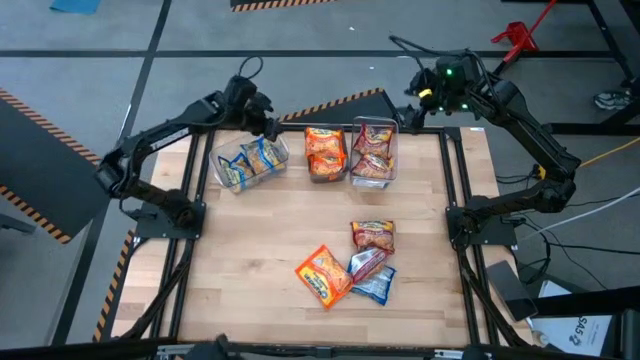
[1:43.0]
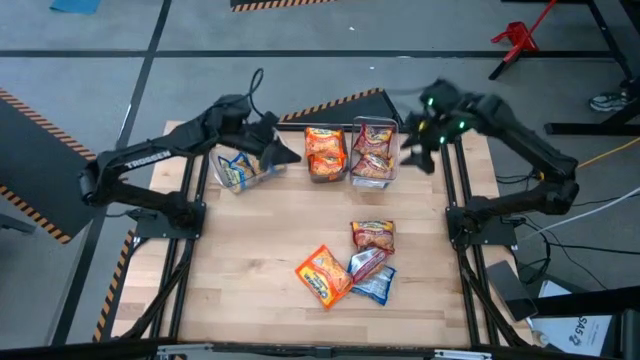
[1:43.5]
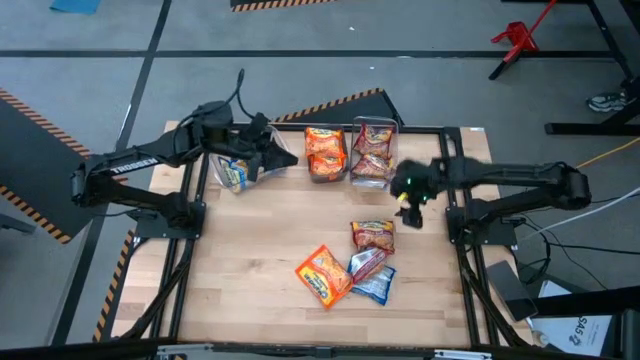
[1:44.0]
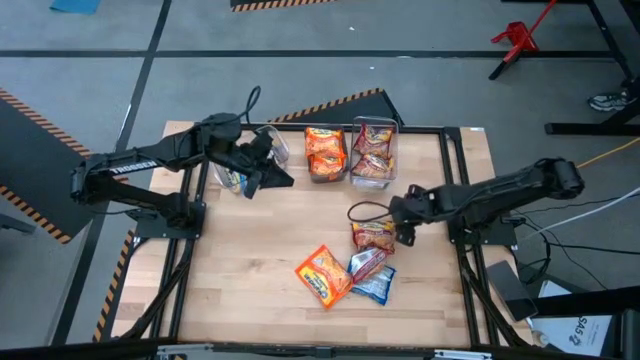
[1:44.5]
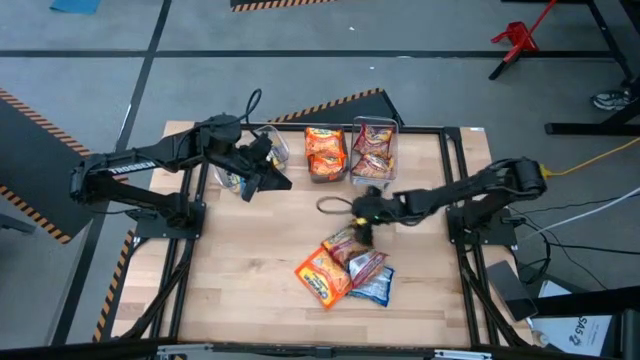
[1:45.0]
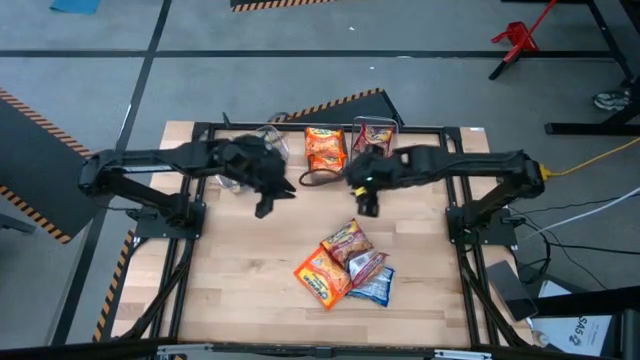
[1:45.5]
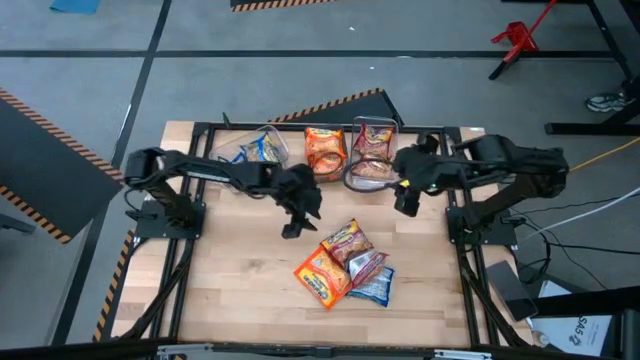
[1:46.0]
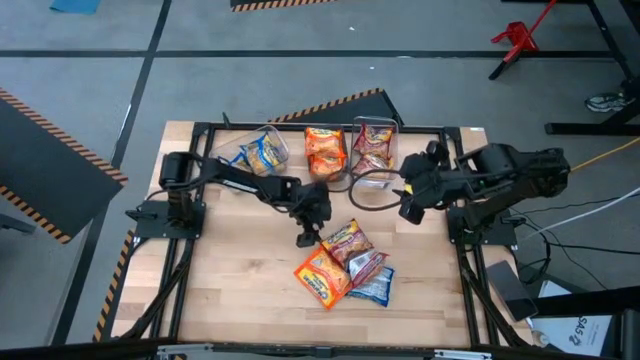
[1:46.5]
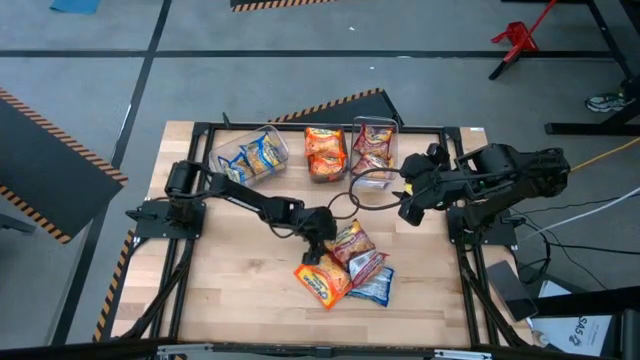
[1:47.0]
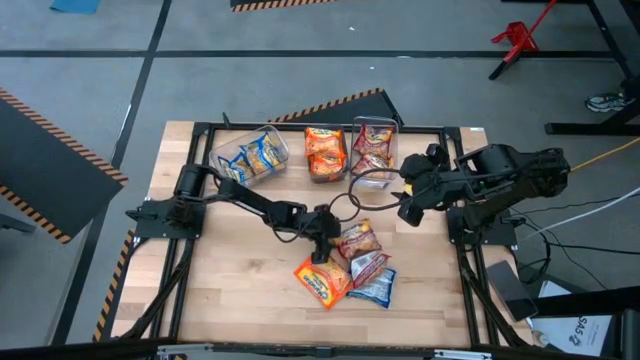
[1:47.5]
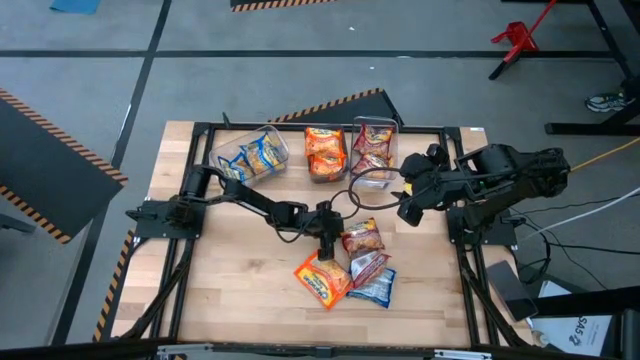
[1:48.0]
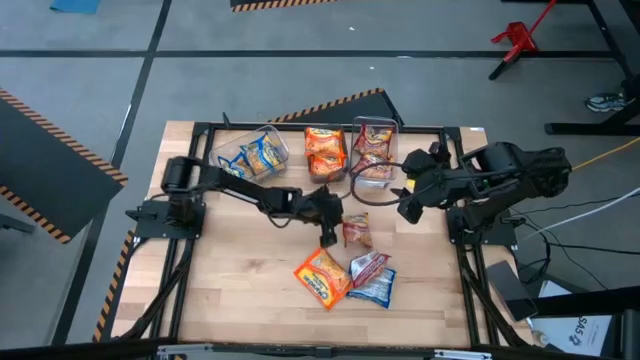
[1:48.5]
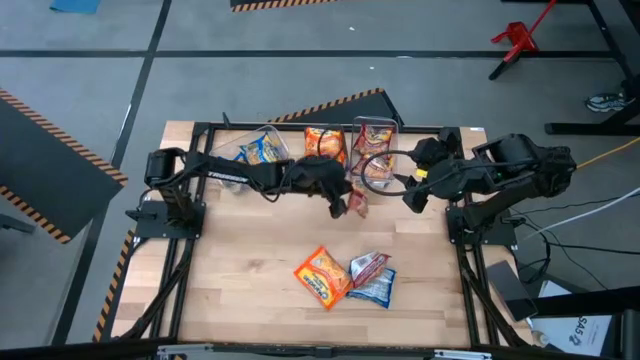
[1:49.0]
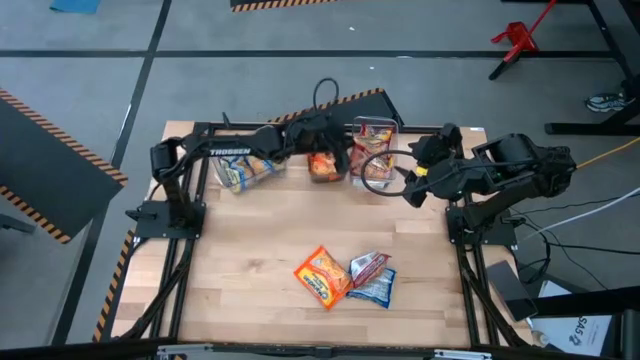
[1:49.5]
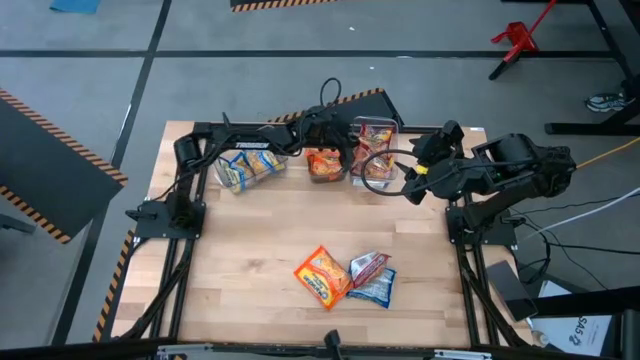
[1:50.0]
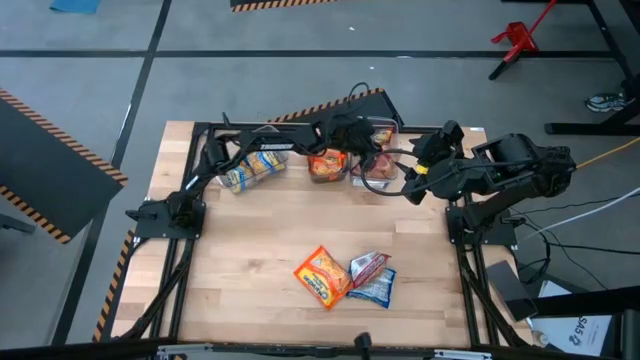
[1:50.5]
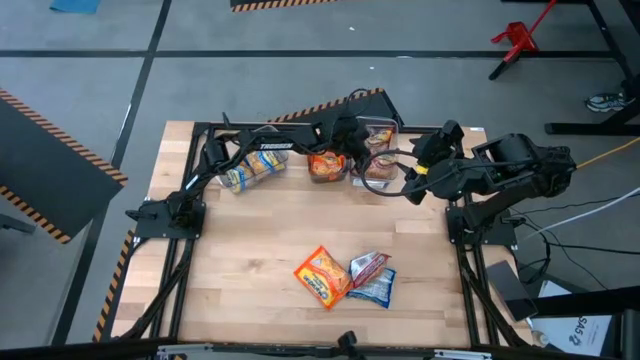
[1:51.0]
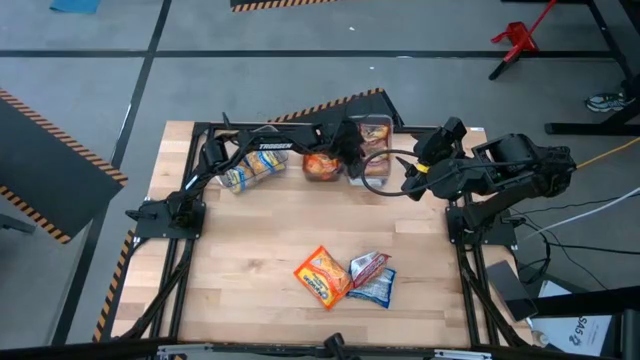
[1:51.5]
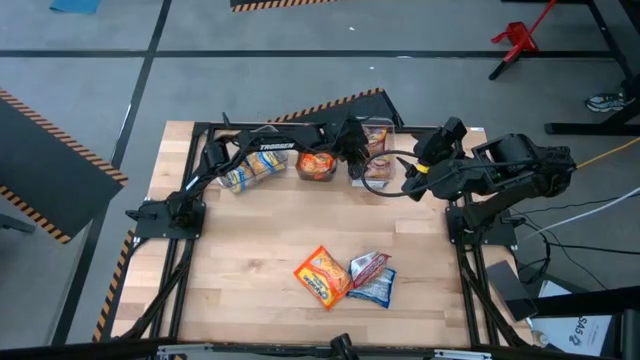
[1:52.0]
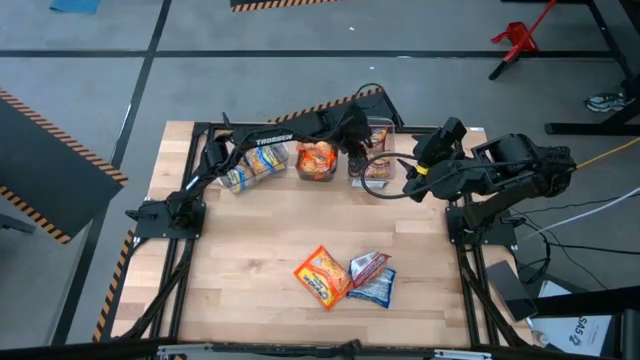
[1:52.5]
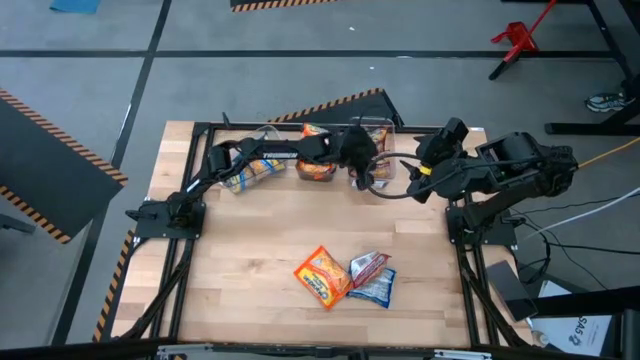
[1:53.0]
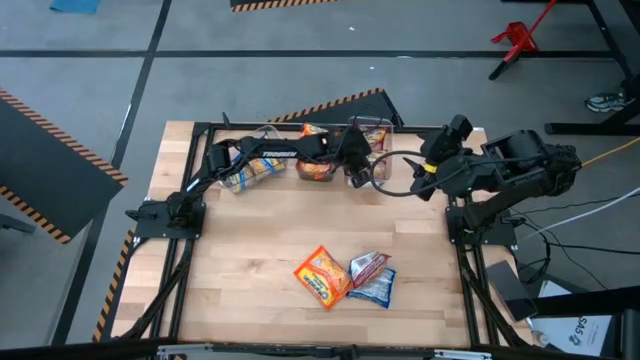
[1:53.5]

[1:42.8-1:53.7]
Task: Sort Maruchan noodles
Put the red noodle pack into the right transparent bin

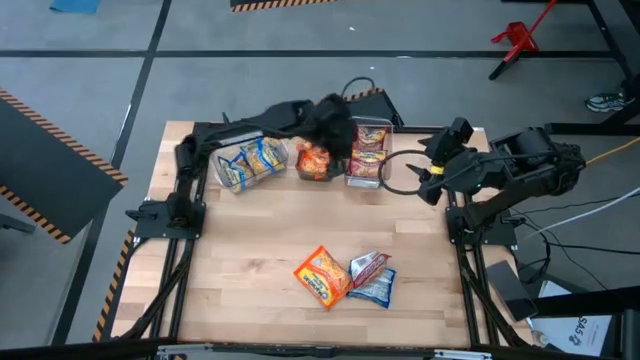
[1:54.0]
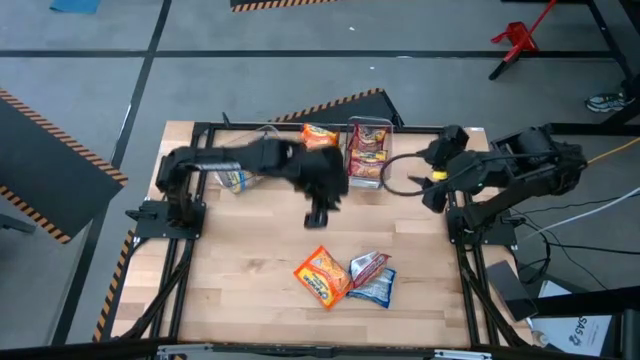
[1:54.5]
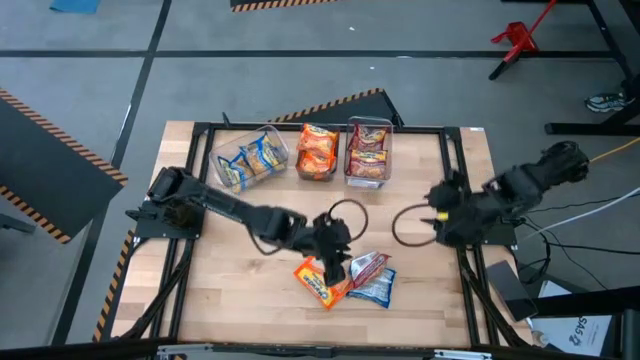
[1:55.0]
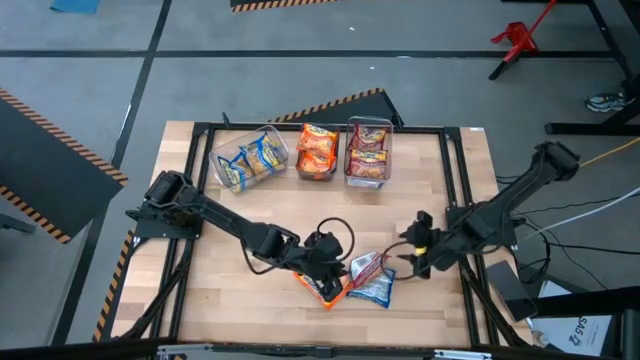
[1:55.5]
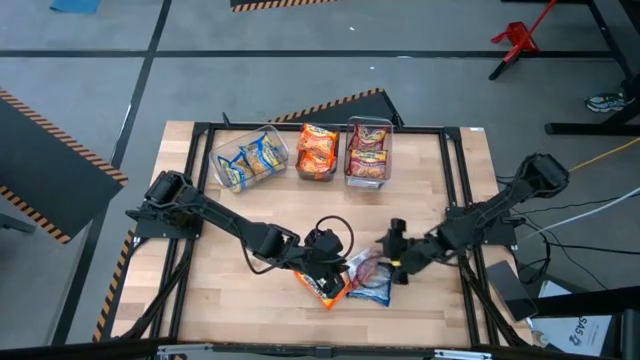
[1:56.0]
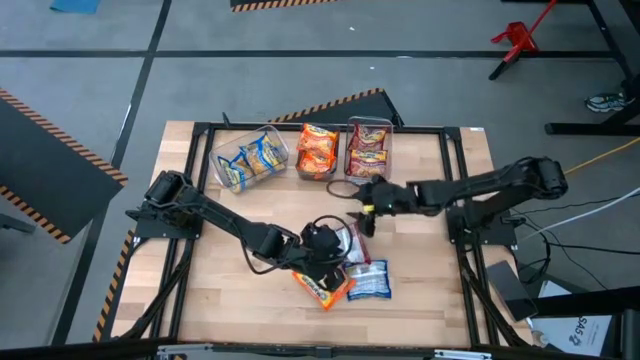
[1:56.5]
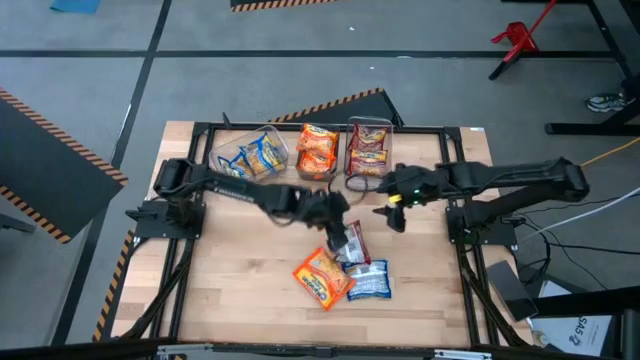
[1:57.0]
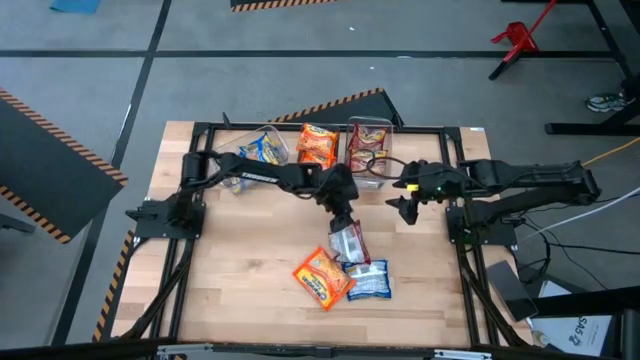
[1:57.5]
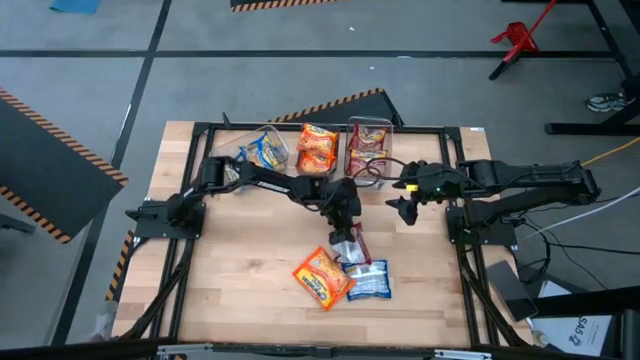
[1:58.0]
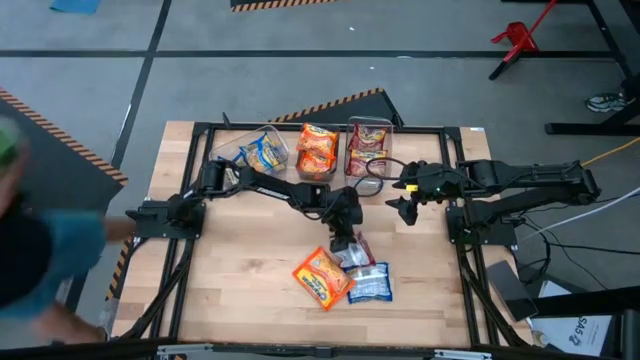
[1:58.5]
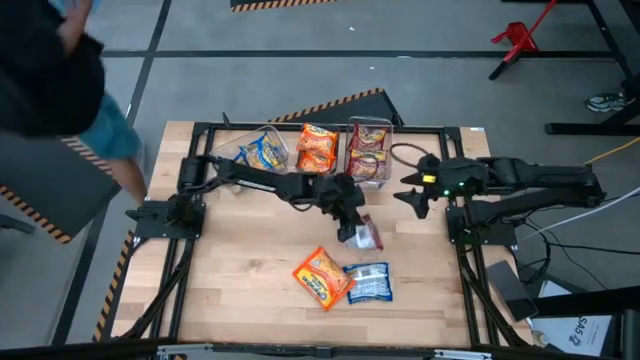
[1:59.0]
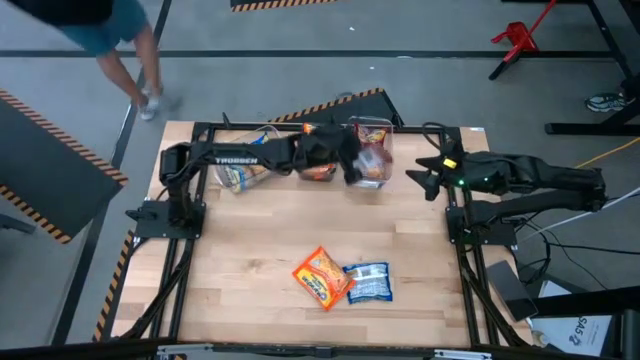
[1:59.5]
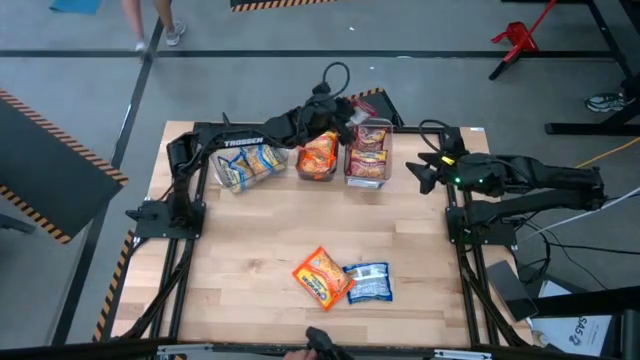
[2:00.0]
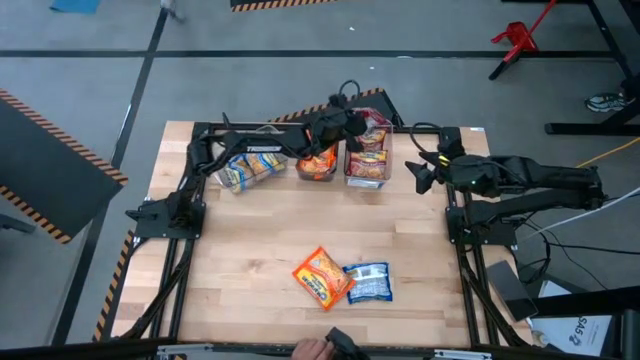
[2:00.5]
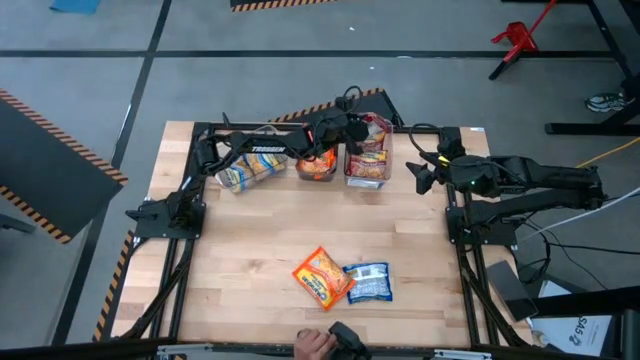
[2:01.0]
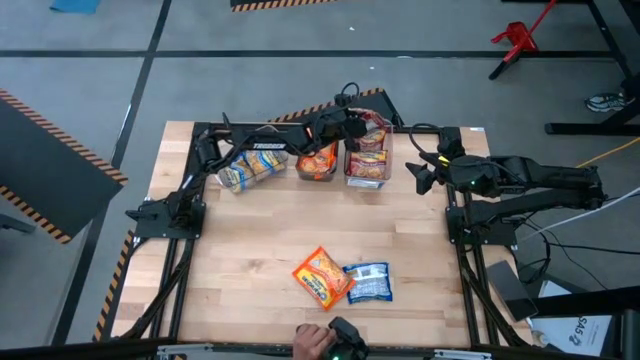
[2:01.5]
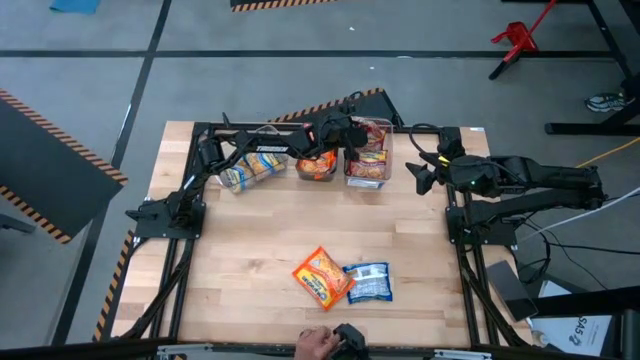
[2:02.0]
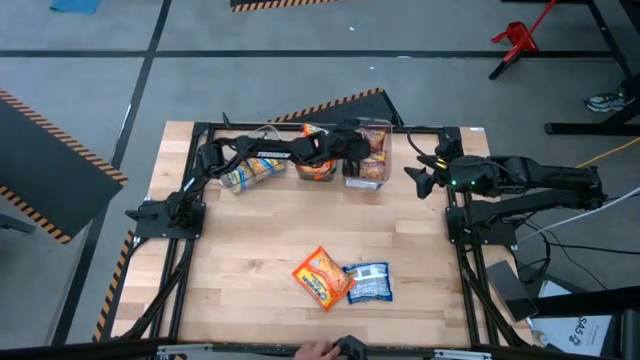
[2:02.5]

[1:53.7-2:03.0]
Put the red noodle pack into the right transparent bin
